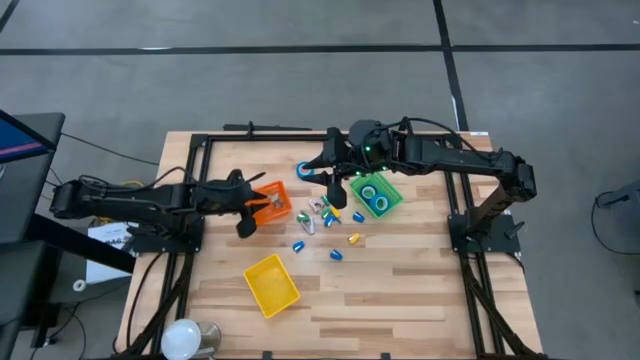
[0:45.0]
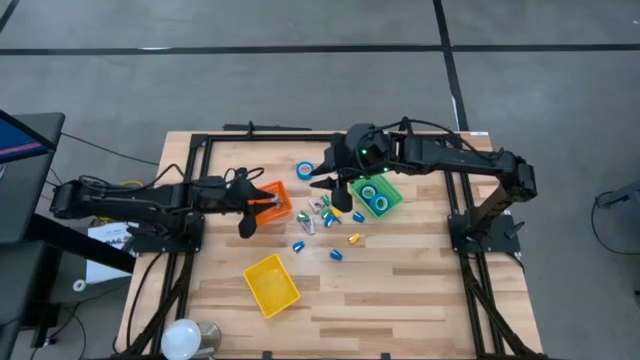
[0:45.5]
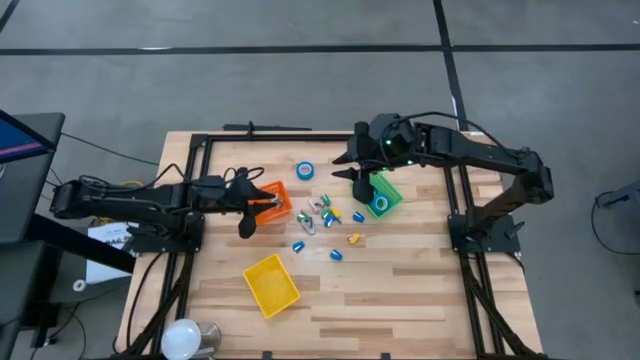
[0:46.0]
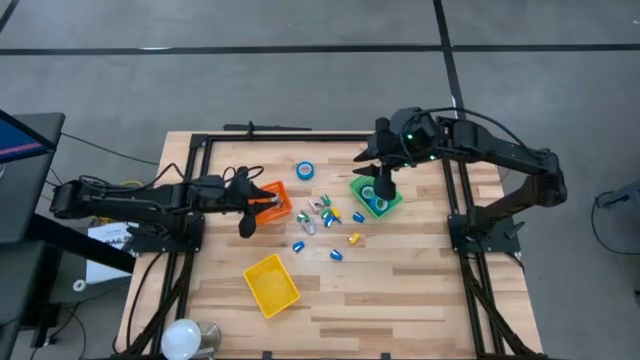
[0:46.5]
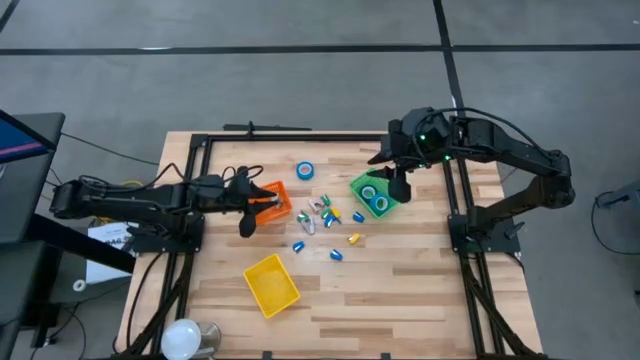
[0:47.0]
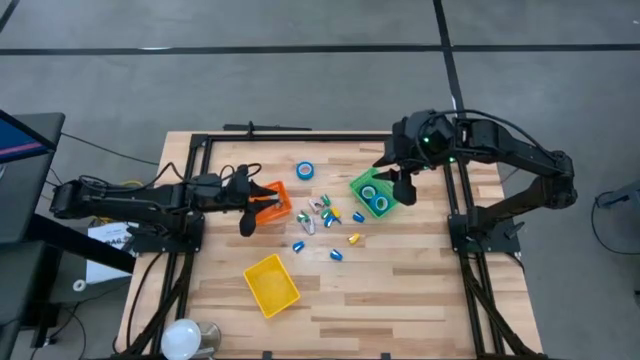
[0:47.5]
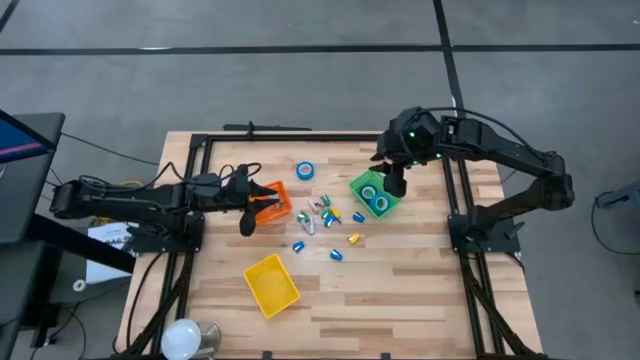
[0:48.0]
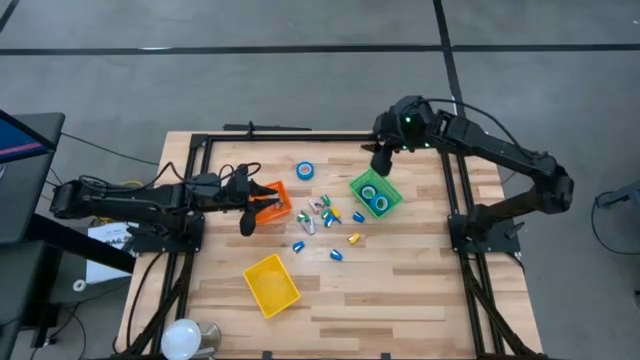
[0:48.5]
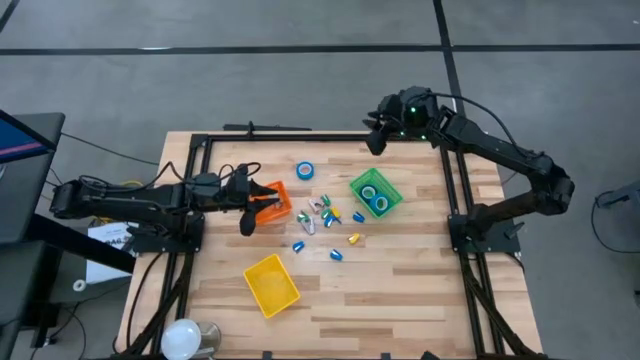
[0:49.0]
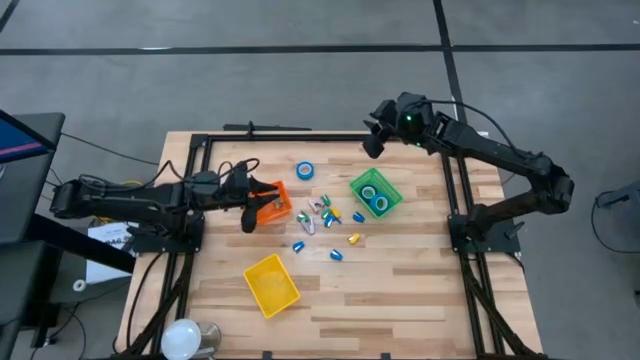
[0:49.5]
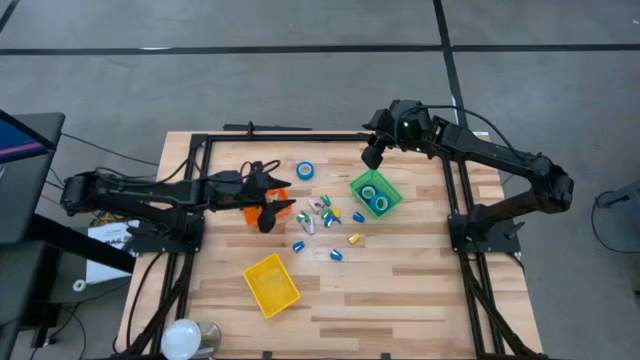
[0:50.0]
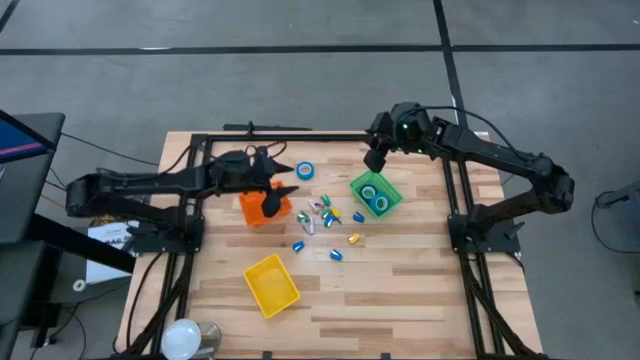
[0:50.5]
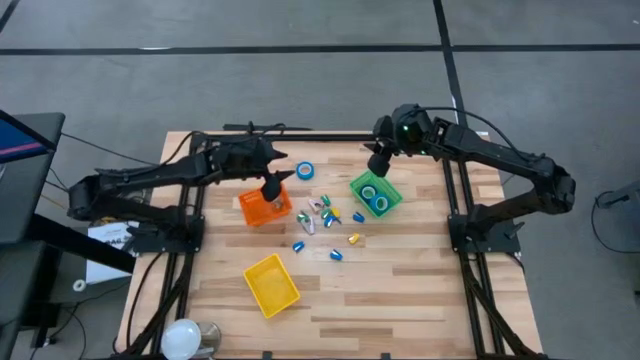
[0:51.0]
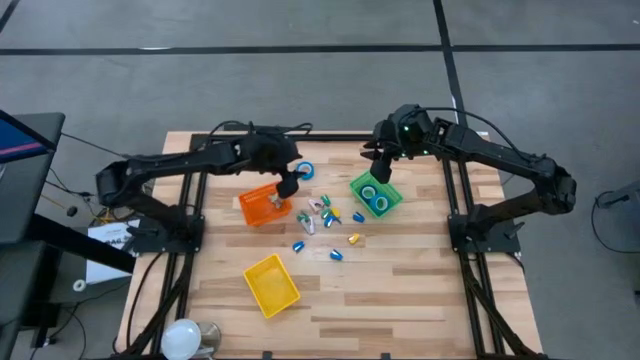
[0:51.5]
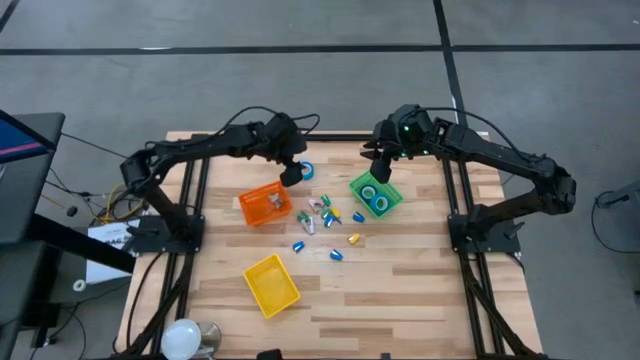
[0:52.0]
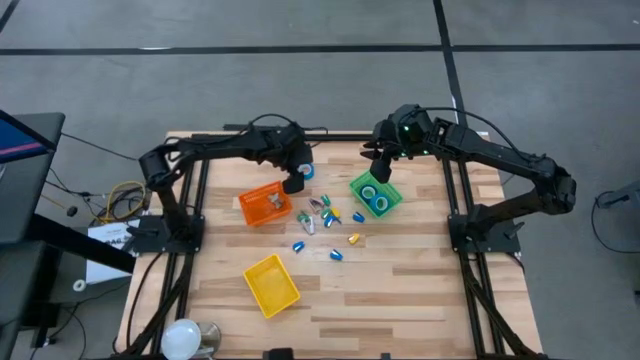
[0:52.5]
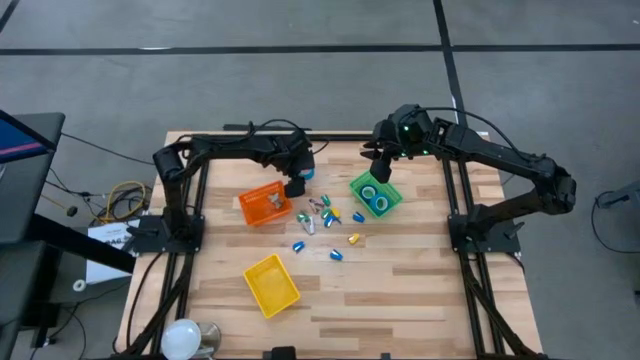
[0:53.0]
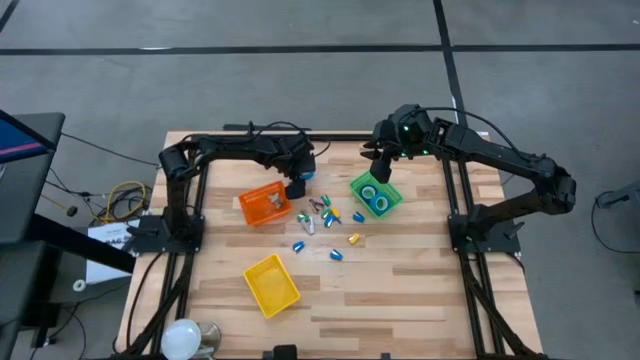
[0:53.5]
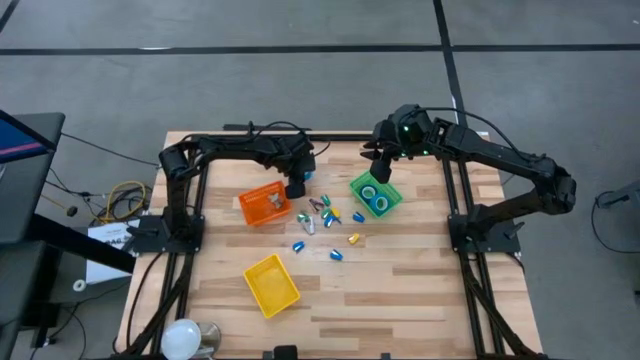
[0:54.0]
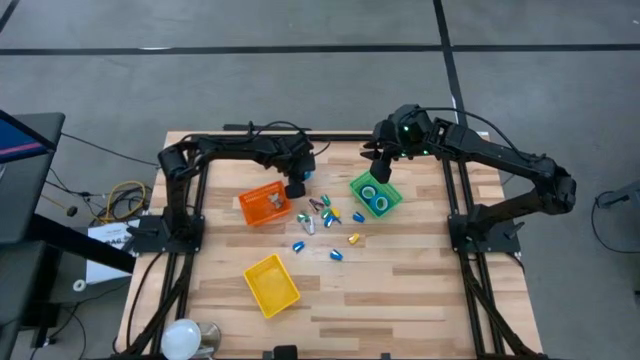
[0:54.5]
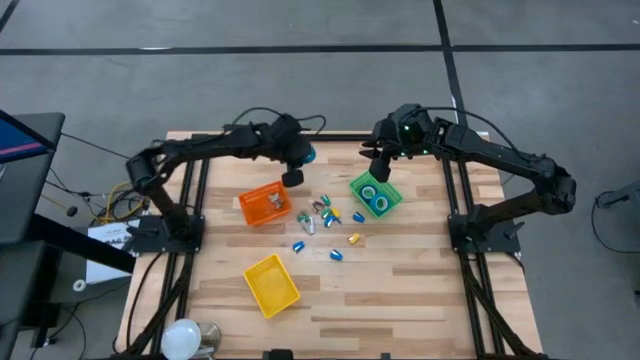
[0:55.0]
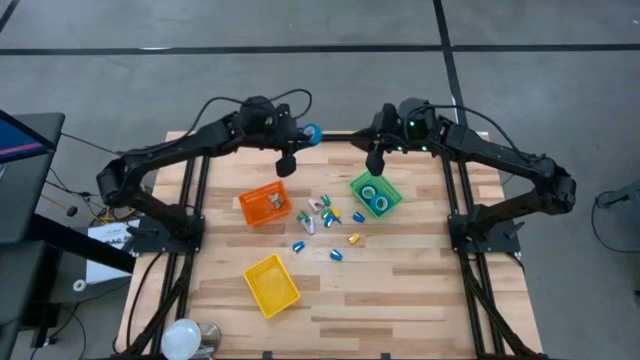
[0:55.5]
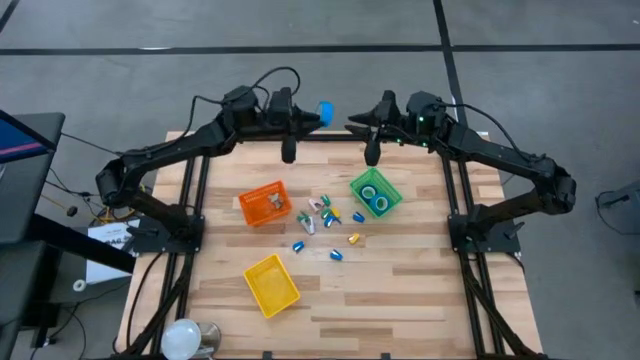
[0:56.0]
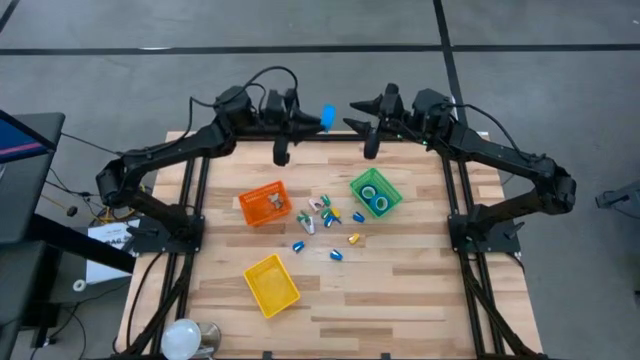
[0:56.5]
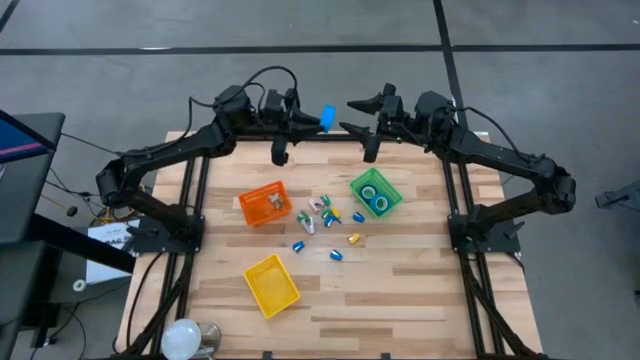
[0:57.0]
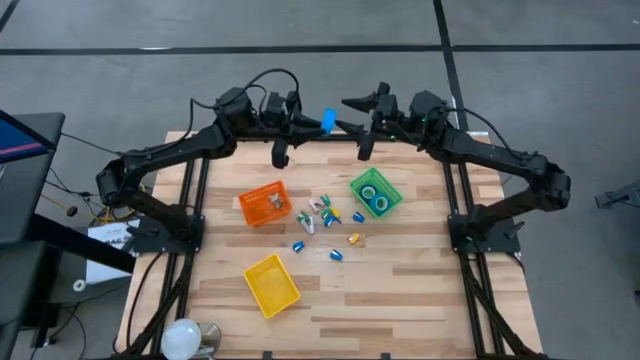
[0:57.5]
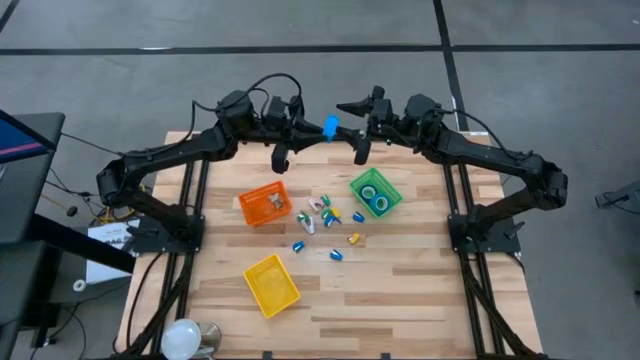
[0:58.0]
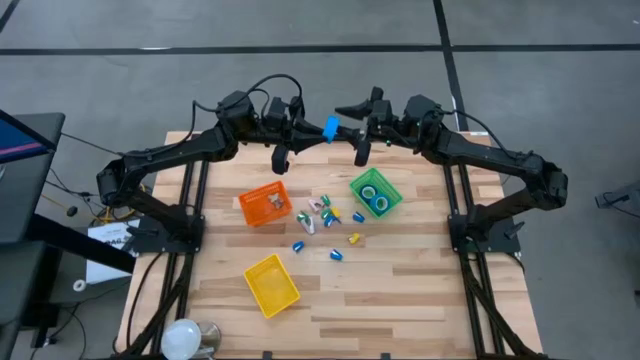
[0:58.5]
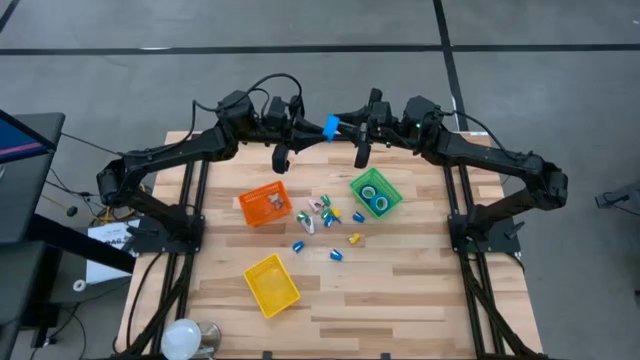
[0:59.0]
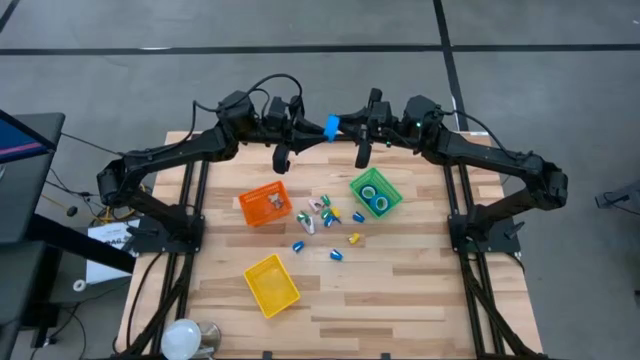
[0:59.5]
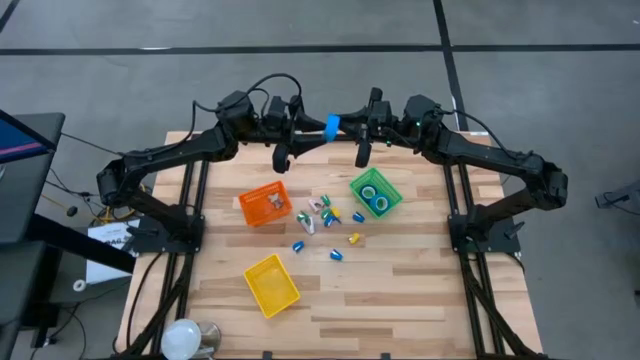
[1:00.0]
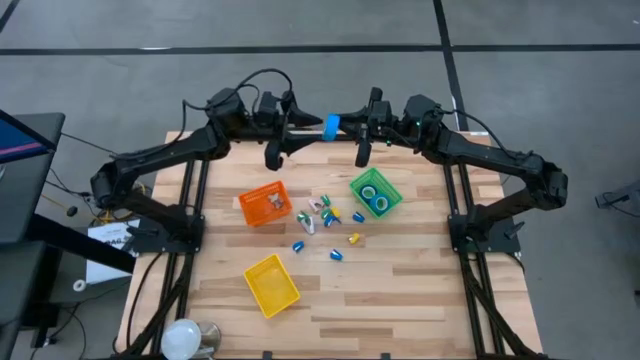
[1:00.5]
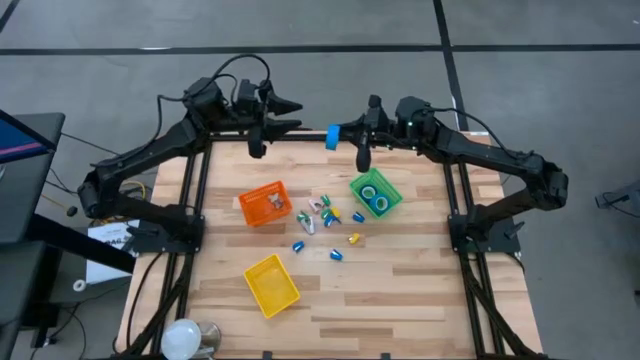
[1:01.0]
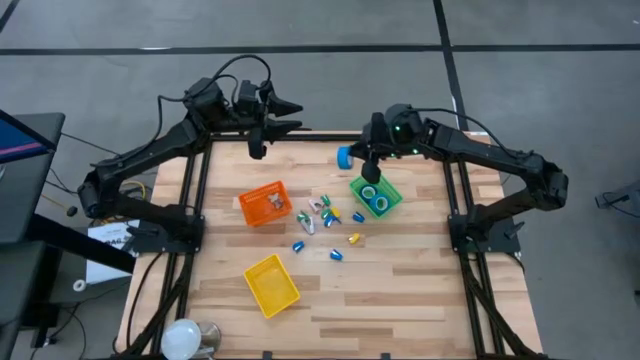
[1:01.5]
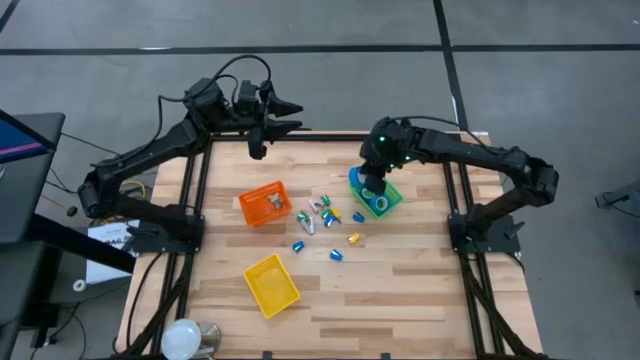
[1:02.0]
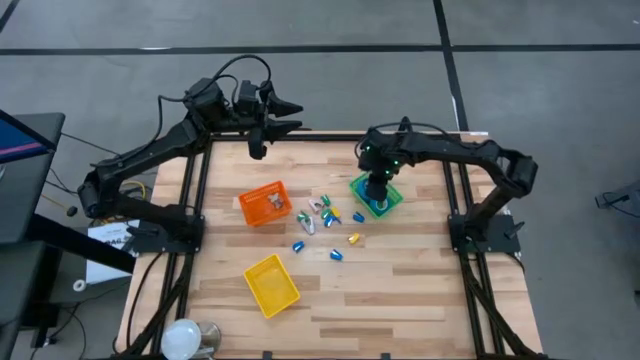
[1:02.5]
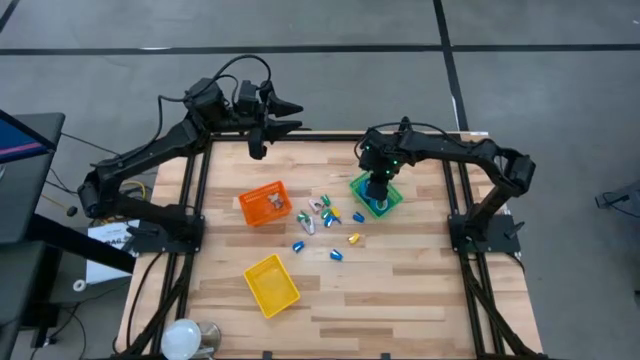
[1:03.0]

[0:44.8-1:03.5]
Task: Pick and place Stapler, Stapler remover, tape
Put the blue tape into the green basket
